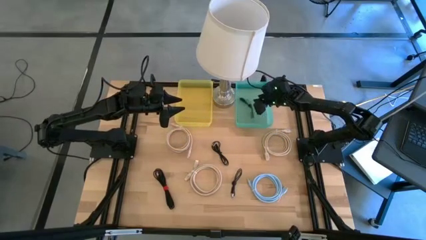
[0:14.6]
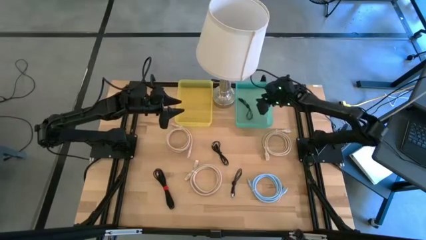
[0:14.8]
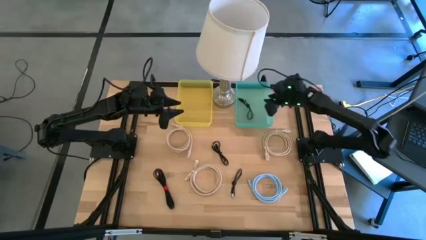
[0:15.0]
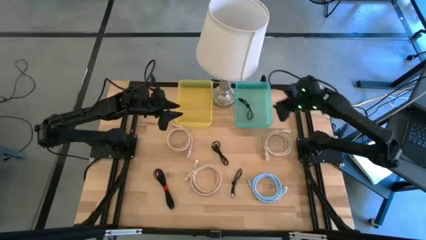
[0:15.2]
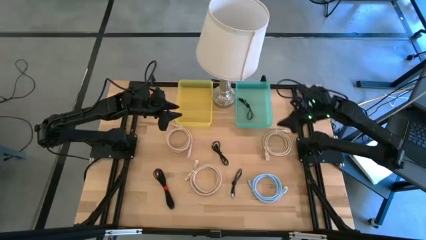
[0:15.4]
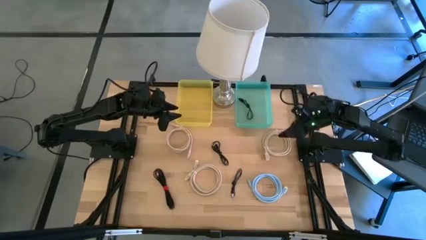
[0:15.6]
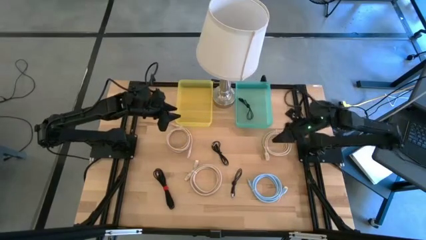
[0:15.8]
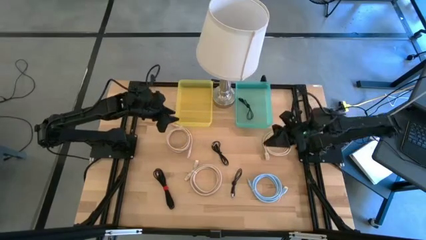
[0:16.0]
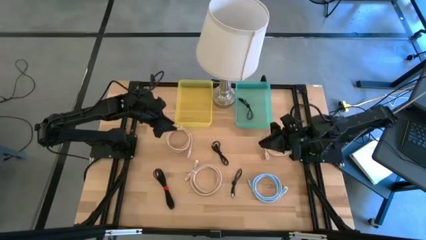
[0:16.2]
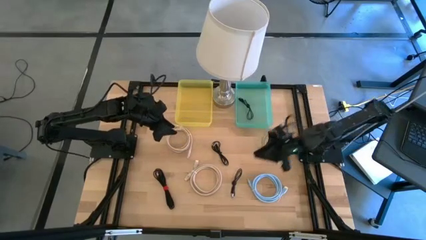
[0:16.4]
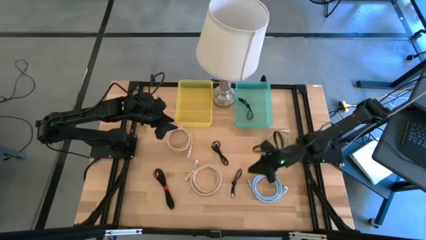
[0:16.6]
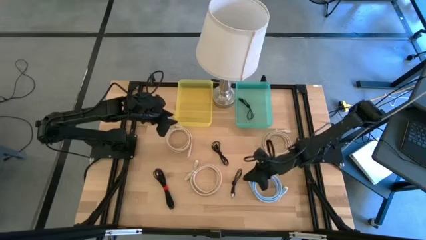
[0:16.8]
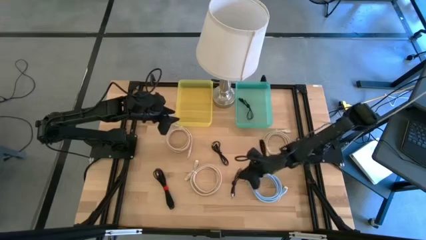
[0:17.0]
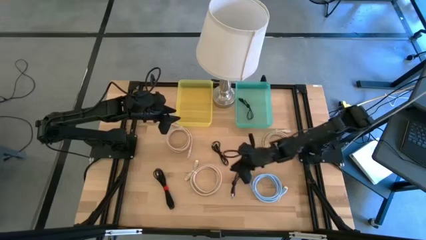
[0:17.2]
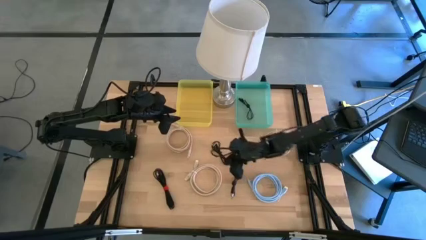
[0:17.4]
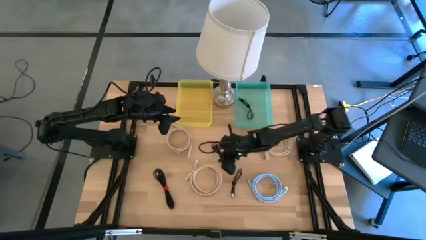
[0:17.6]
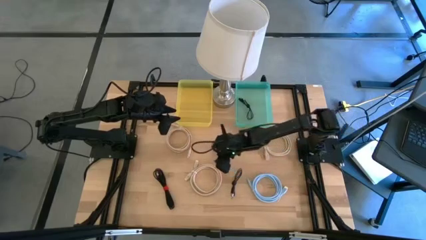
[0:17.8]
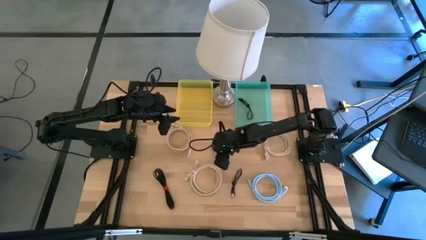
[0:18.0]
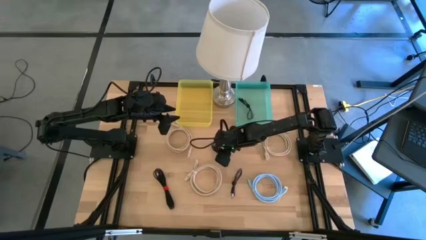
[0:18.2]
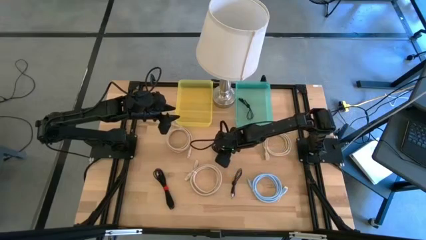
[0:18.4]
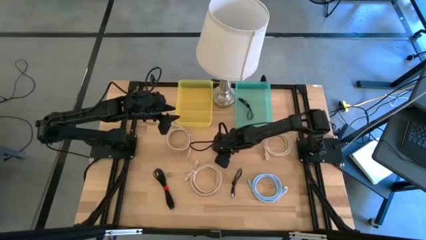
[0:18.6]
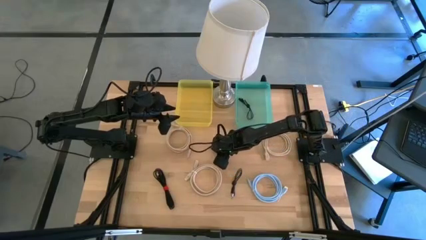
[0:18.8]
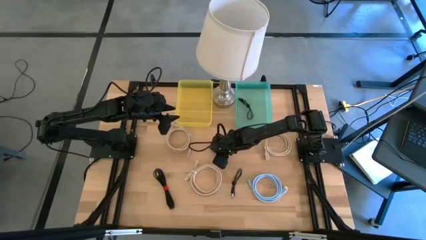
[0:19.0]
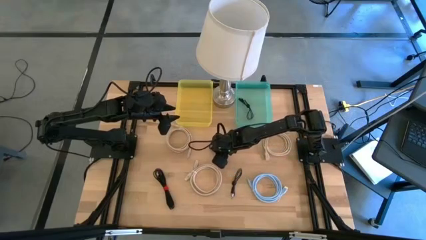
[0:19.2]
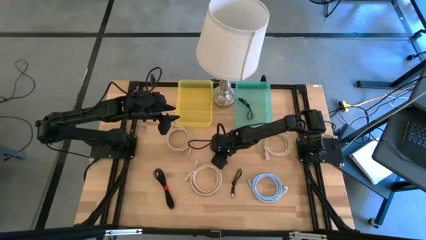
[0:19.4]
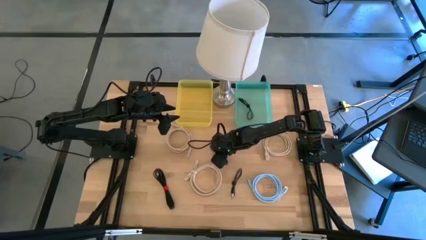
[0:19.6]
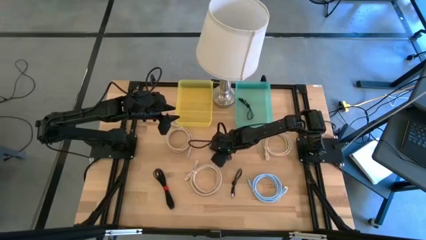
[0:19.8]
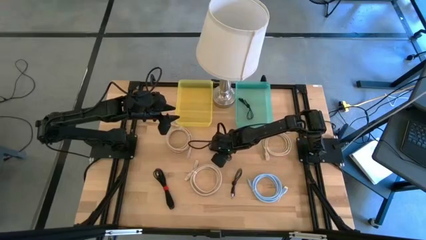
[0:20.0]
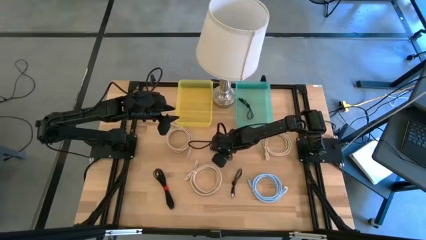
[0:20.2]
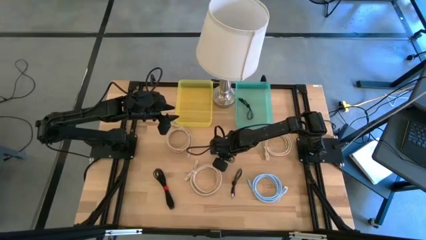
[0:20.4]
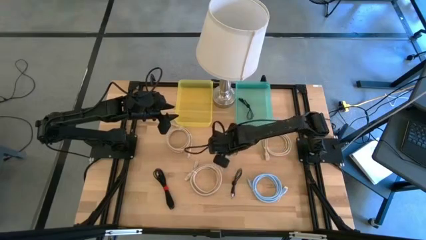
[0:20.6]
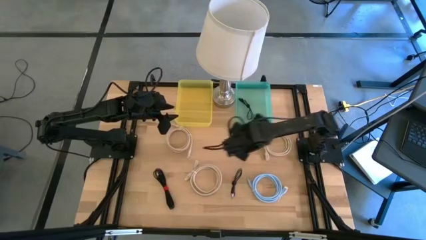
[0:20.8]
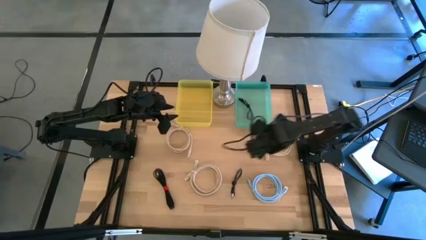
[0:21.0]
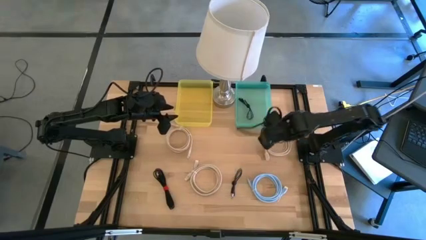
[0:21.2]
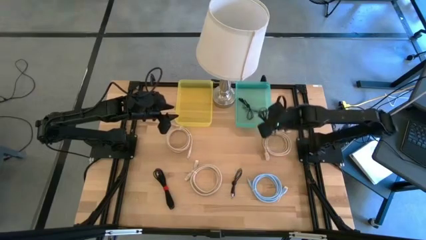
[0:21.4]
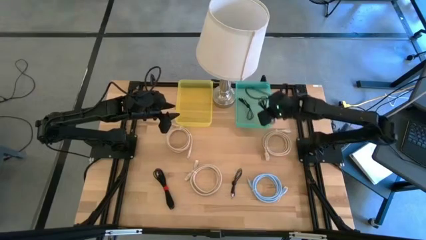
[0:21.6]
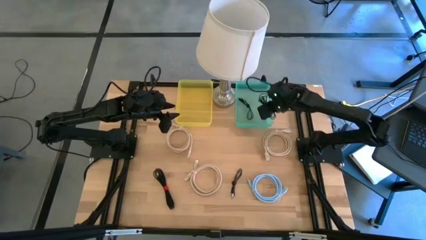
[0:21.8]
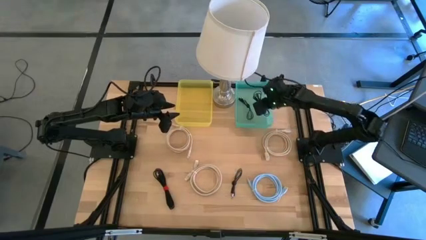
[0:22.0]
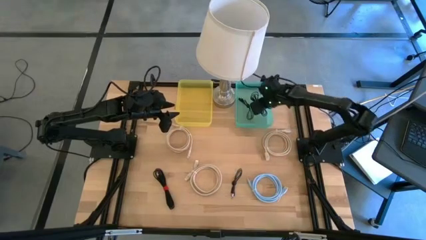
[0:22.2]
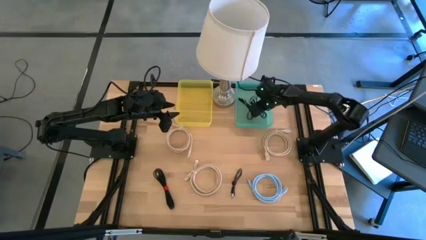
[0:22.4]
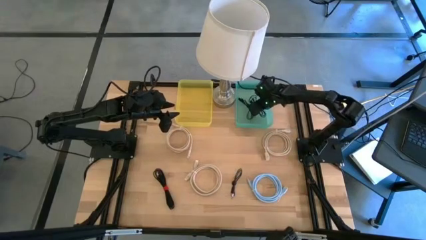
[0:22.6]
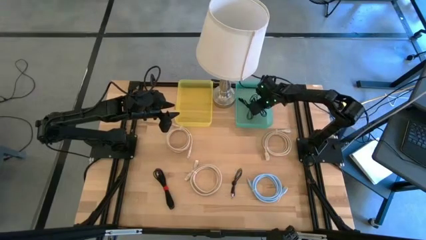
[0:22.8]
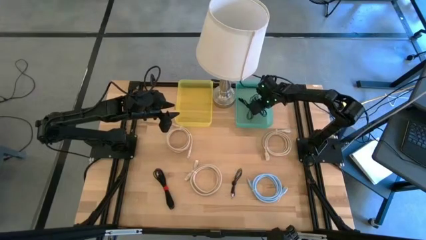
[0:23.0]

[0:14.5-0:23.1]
Put the black USB cable into the blue bin

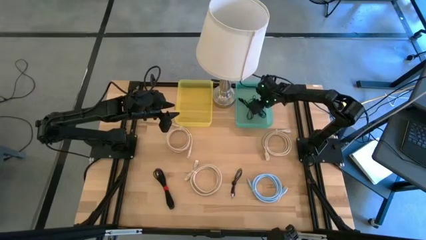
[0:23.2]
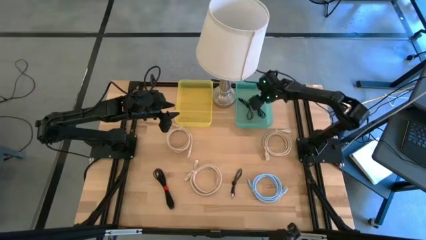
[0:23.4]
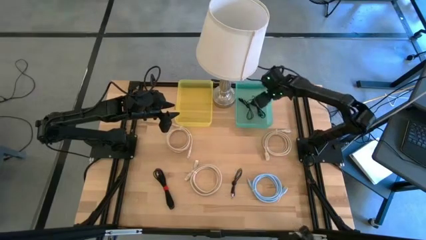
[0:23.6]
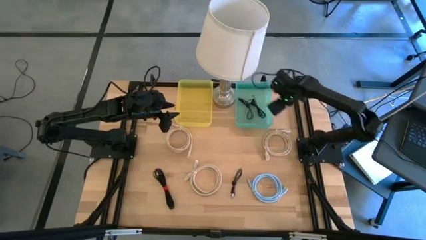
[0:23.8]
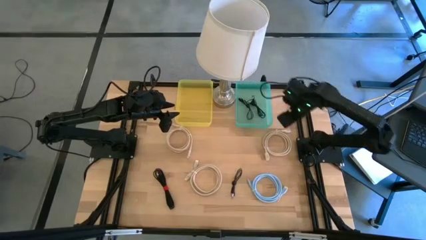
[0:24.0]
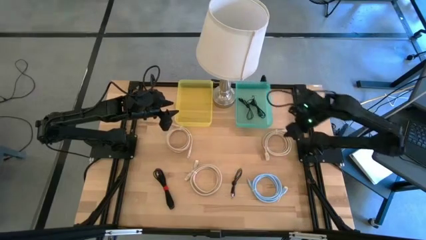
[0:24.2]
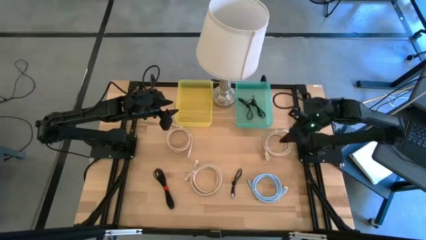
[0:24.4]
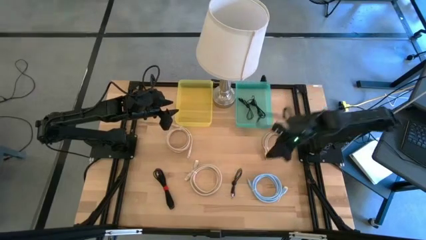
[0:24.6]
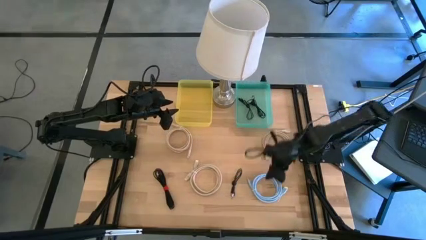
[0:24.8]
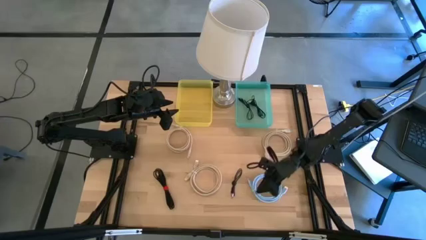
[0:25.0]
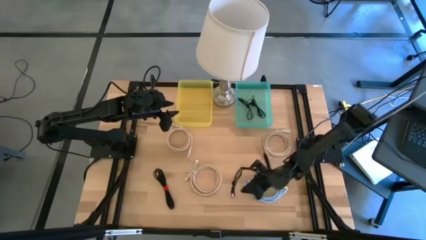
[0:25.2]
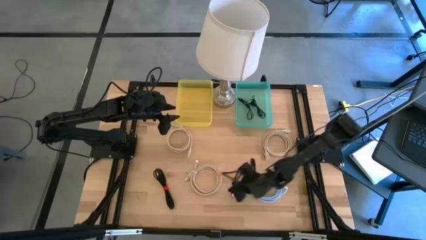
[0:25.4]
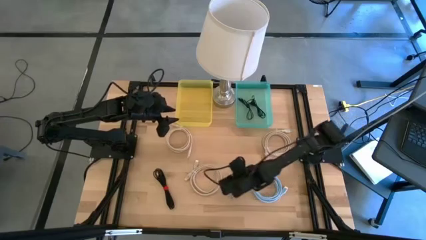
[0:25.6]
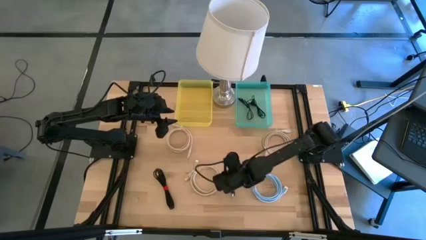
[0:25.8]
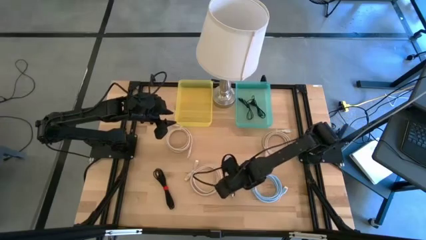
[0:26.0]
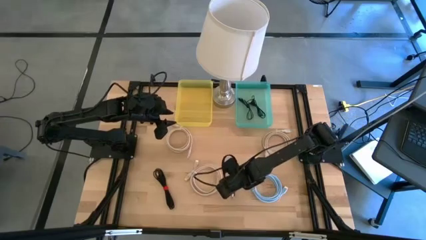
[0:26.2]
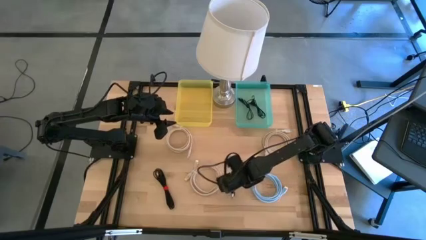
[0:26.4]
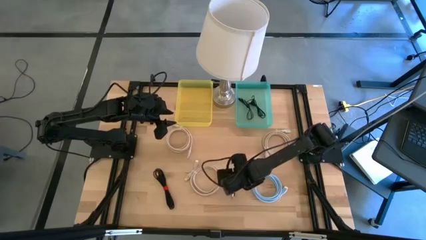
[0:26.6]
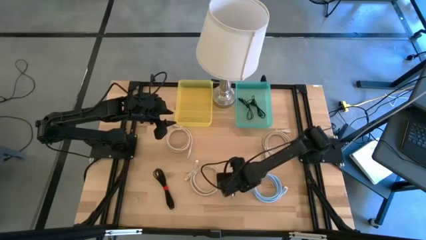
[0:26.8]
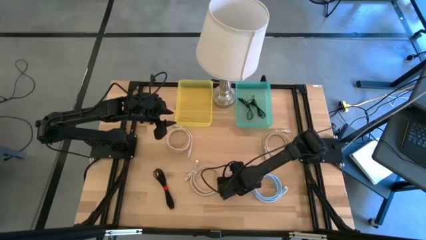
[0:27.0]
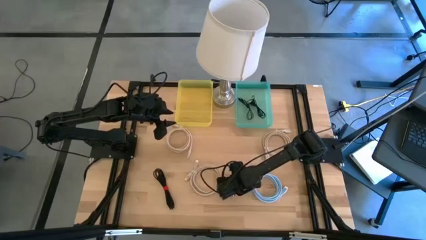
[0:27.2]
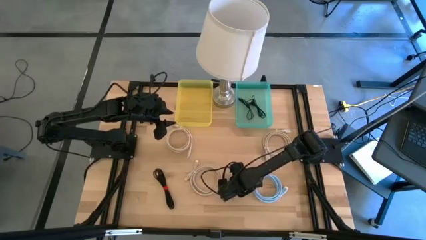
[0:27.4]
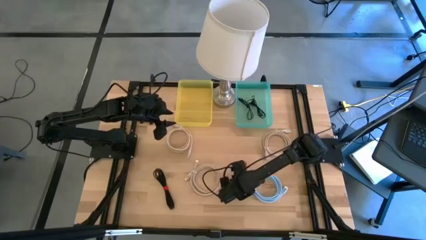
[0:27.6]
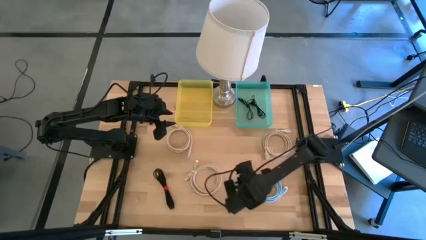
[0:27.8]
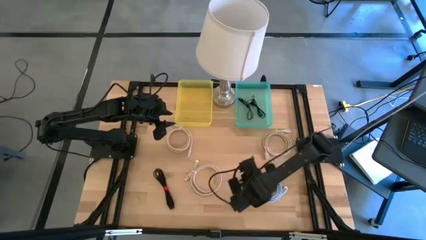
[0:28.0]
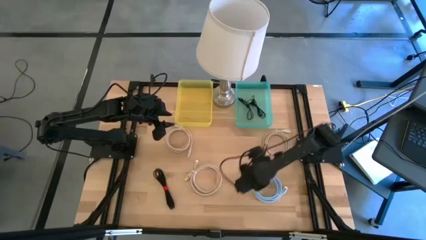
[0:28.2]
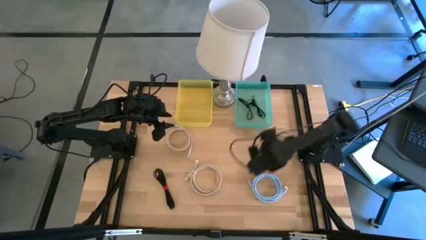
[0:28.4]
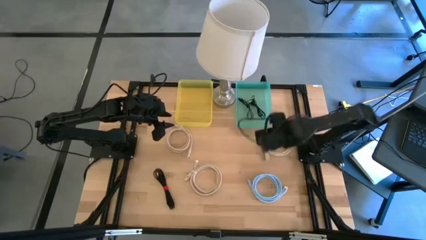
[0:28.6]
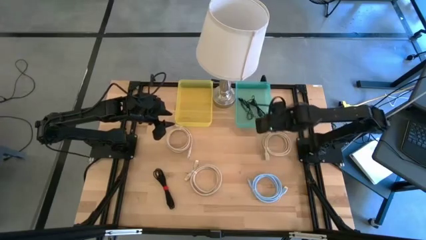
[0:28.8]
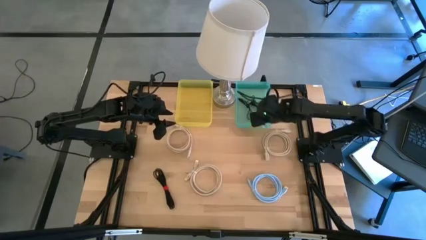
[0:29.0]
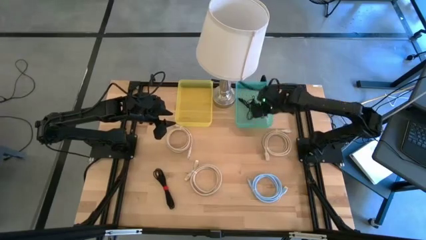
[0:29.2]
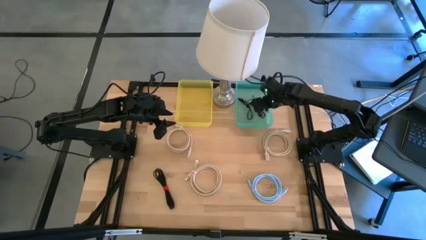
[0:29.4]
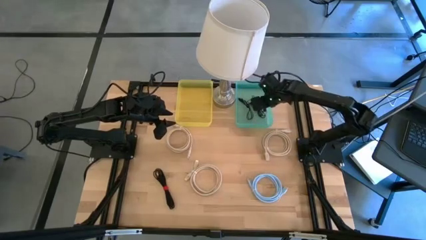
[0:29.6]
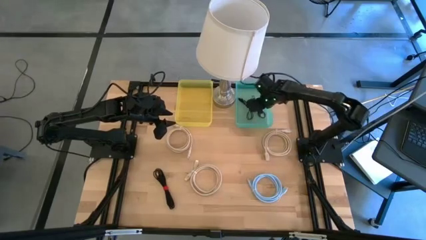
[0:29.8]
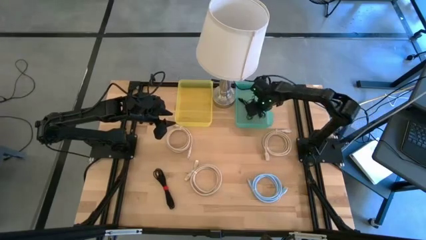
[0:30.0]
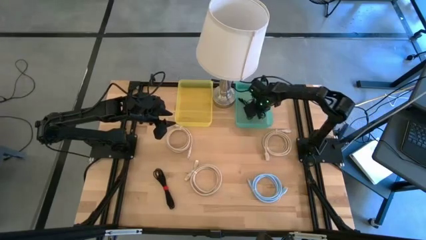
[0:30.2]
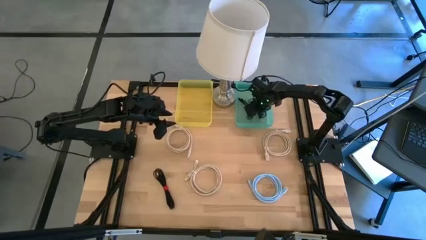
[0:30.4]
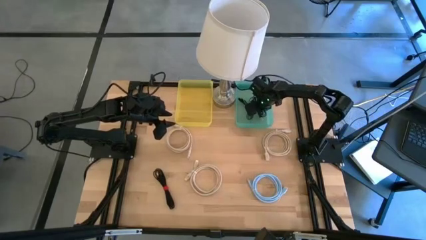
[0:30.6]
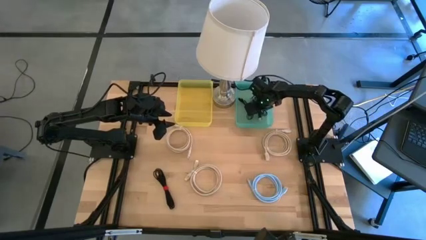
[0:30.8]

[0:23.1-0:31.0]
Put the black USB cable into the blue bin
